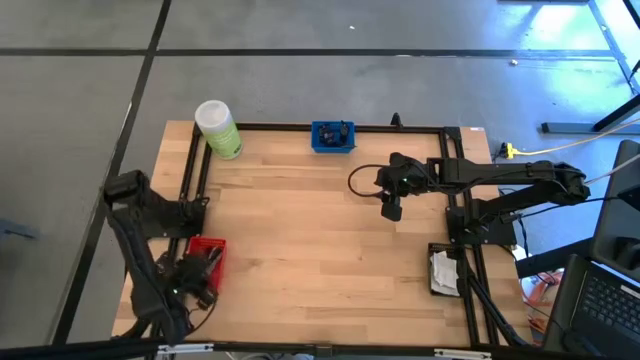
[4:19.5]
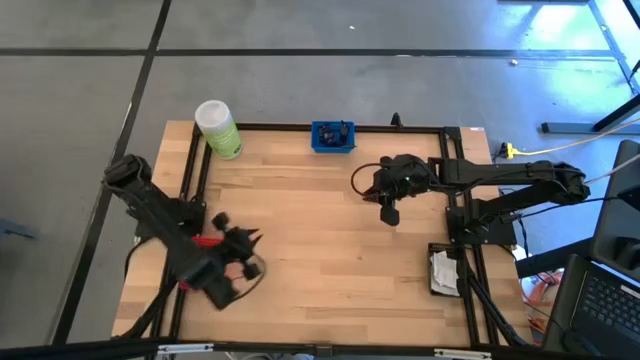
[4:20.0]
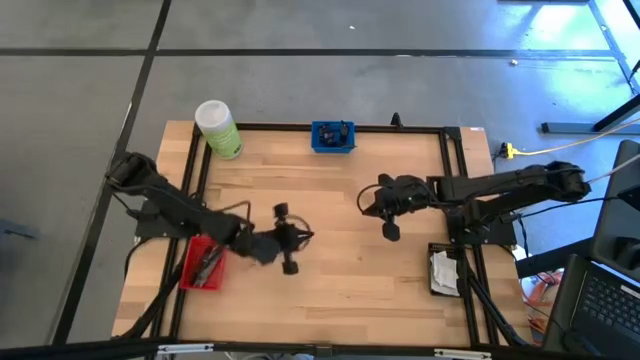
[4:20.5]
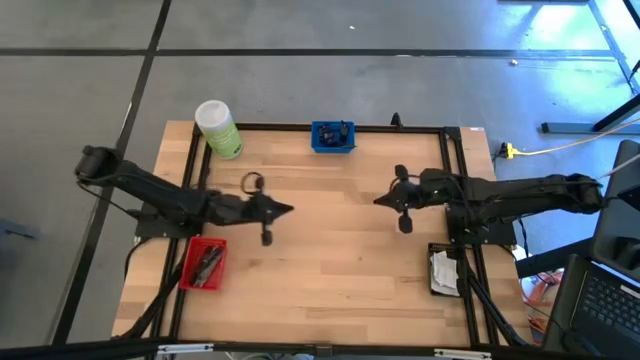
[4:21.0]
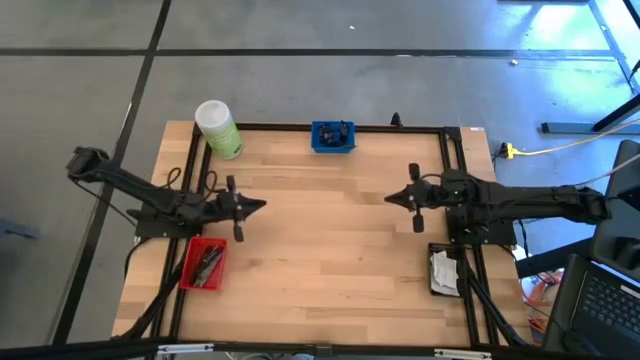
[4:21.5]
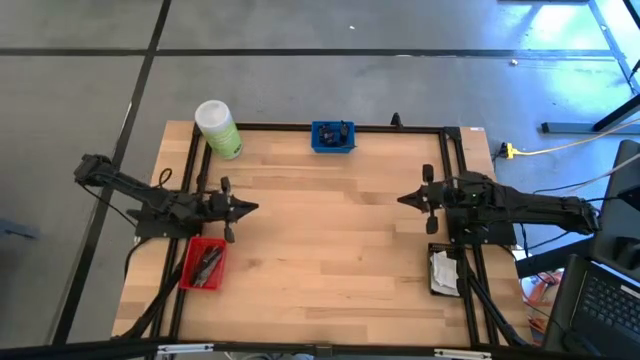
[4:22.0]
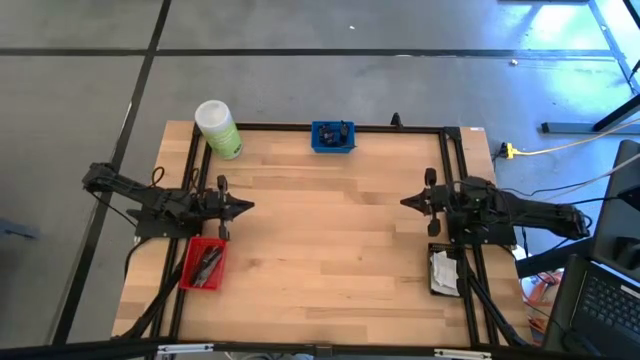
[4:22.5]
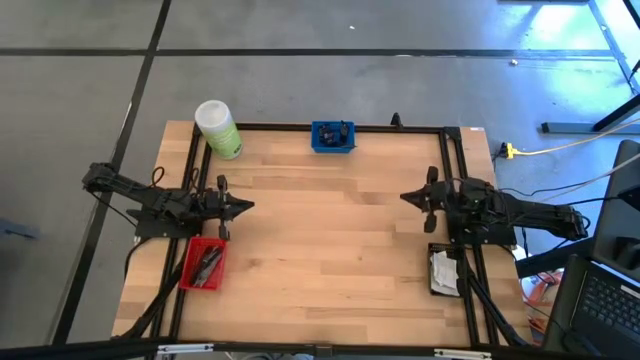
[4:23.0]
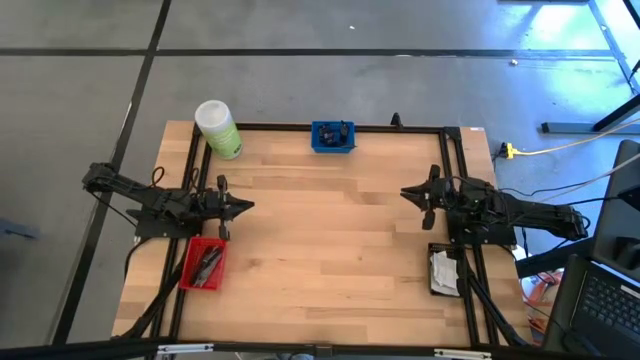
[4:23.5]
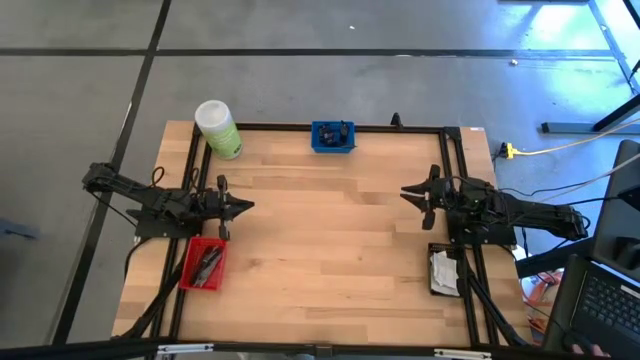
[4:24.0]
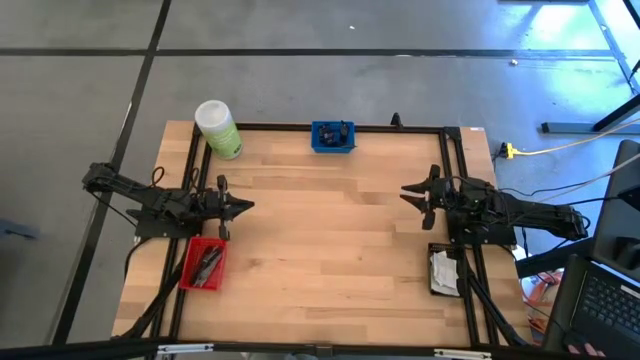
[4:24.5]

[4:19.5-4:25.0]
Task: Pick & Place Travel size toiletries
Return to Home Position

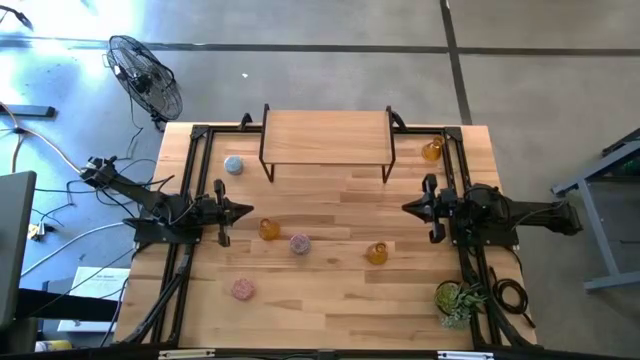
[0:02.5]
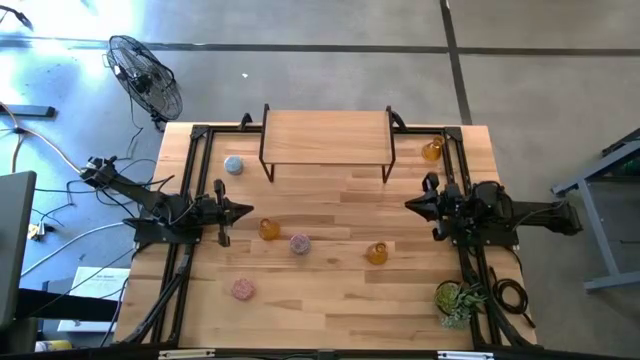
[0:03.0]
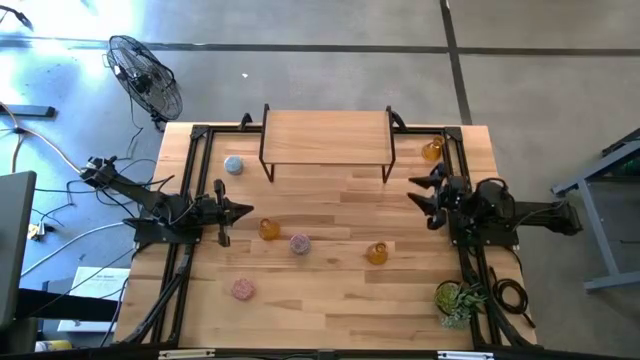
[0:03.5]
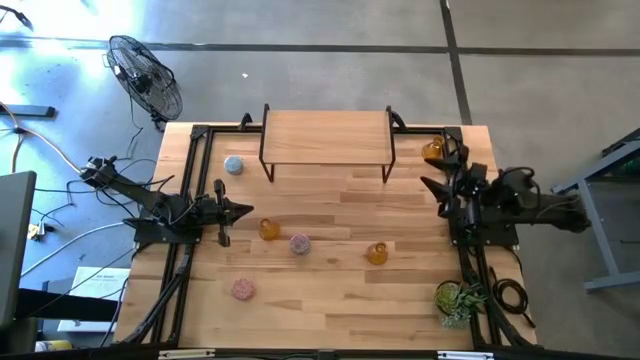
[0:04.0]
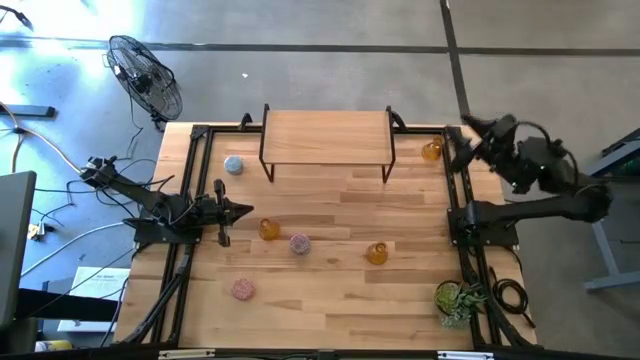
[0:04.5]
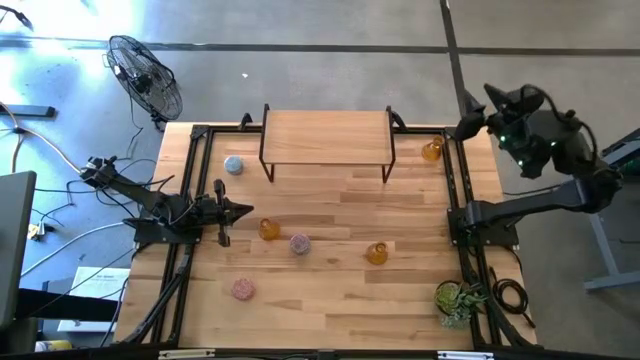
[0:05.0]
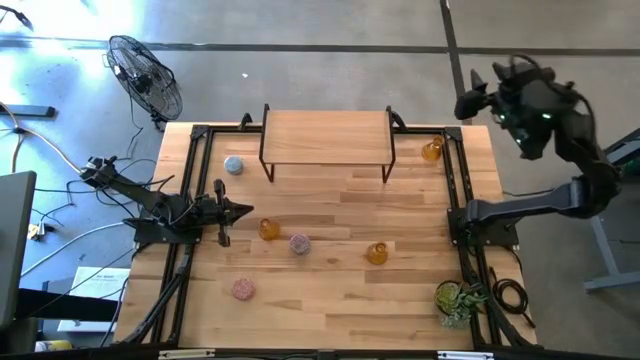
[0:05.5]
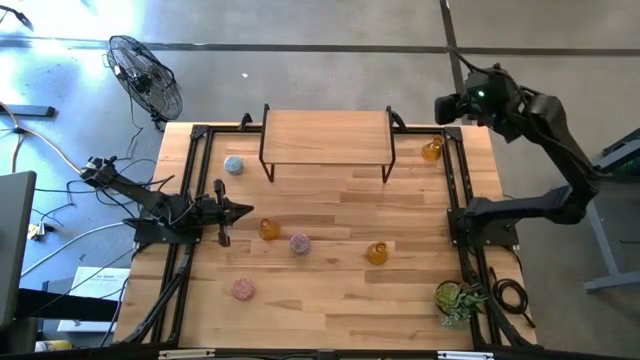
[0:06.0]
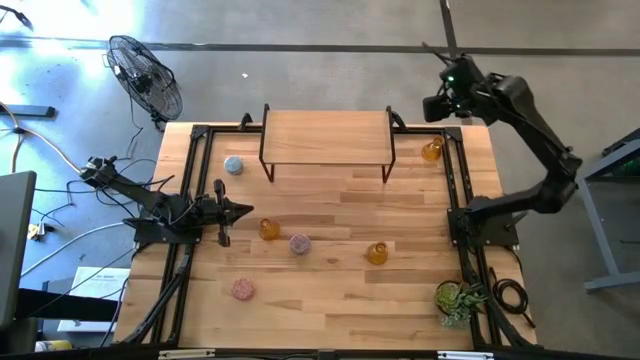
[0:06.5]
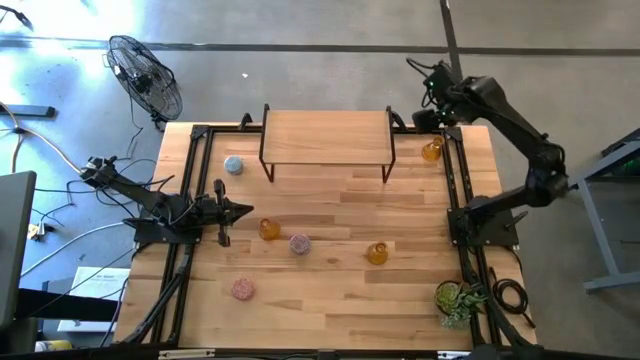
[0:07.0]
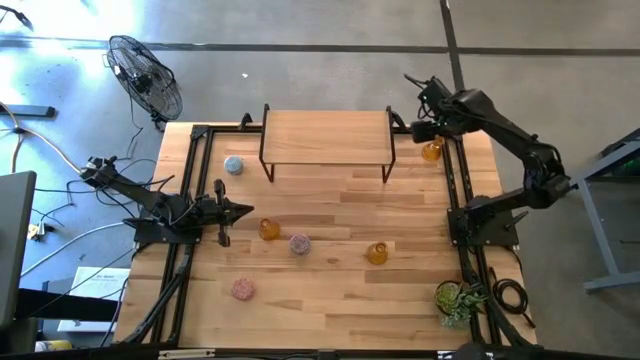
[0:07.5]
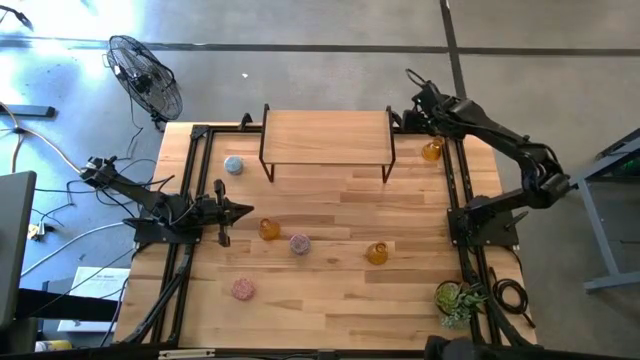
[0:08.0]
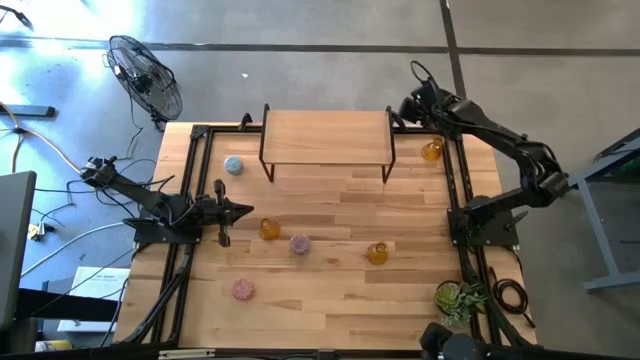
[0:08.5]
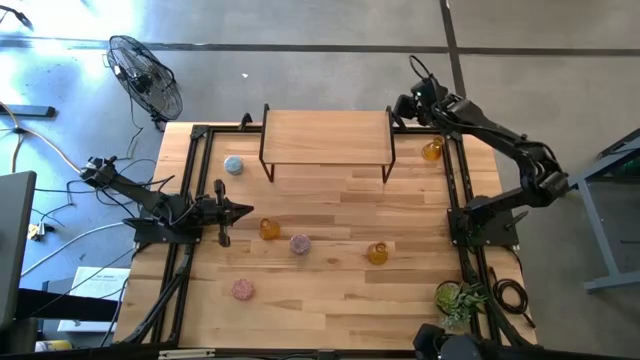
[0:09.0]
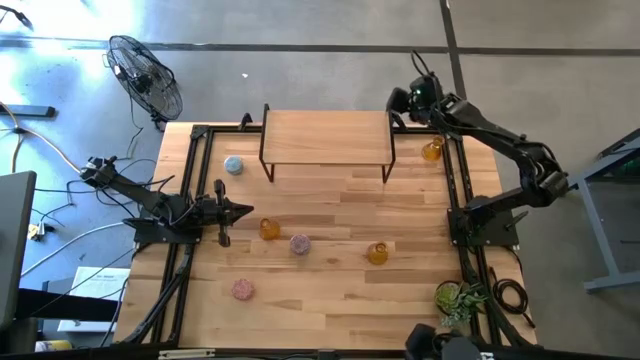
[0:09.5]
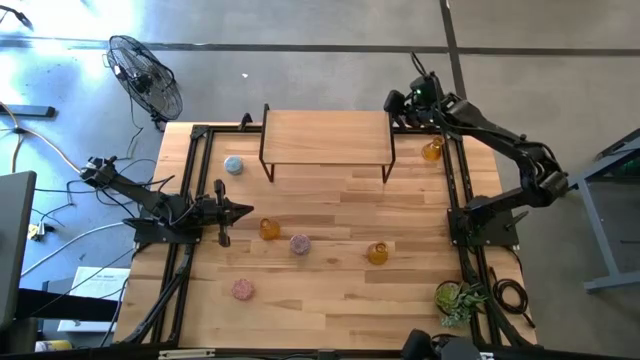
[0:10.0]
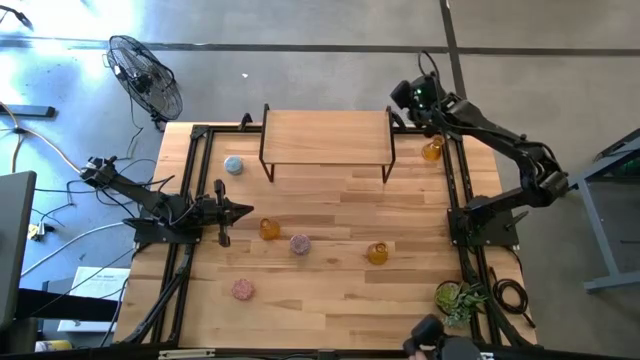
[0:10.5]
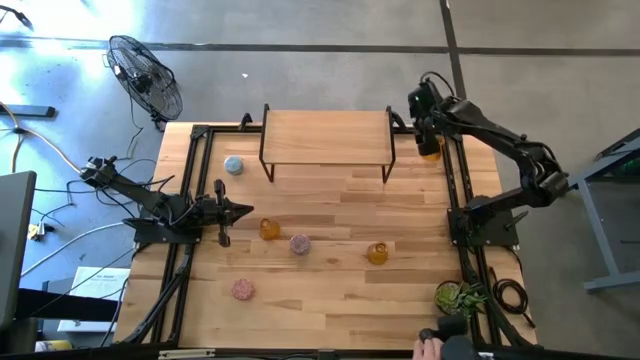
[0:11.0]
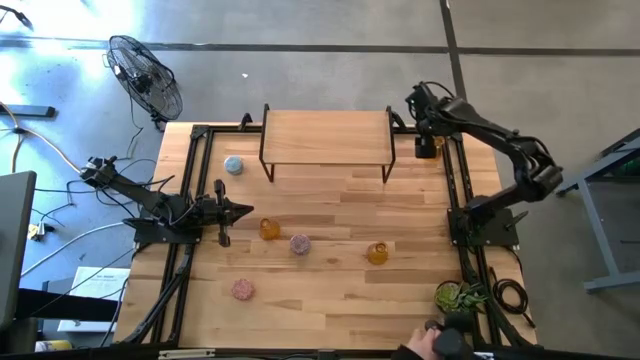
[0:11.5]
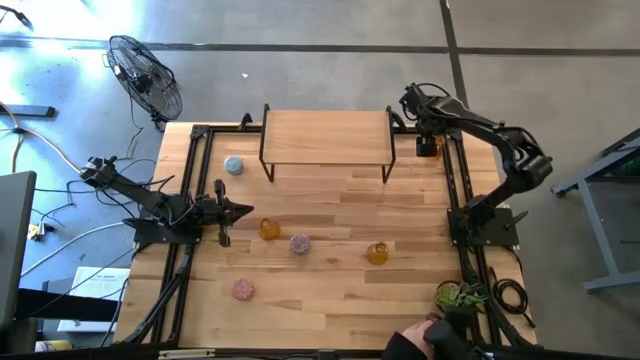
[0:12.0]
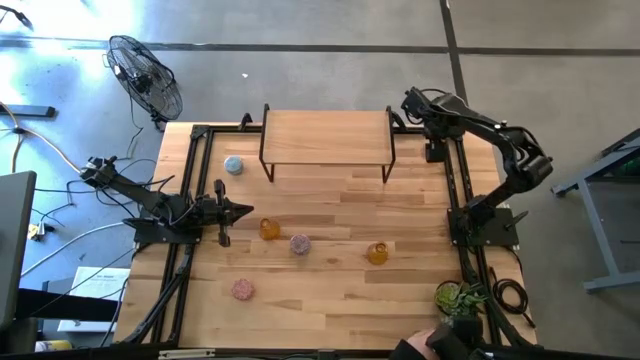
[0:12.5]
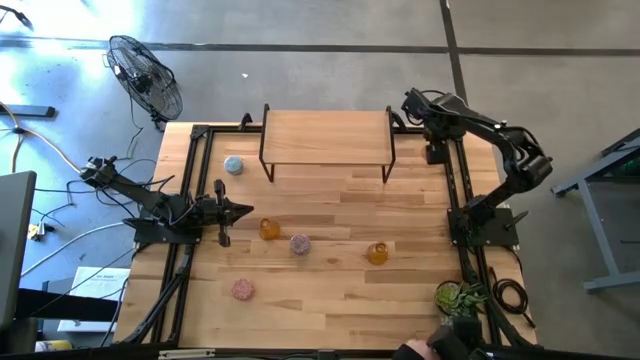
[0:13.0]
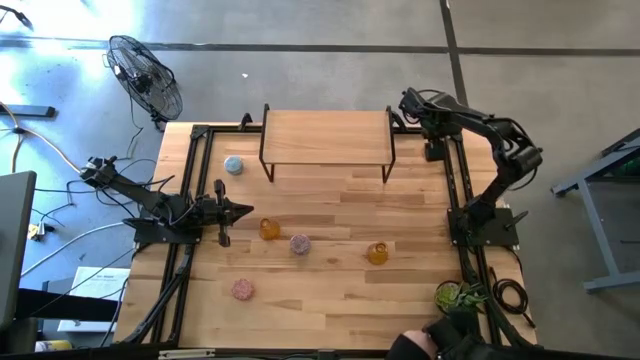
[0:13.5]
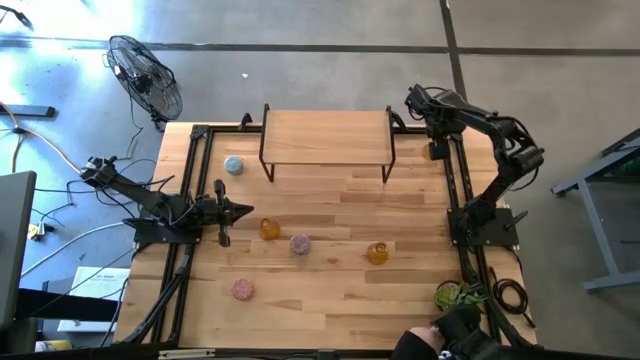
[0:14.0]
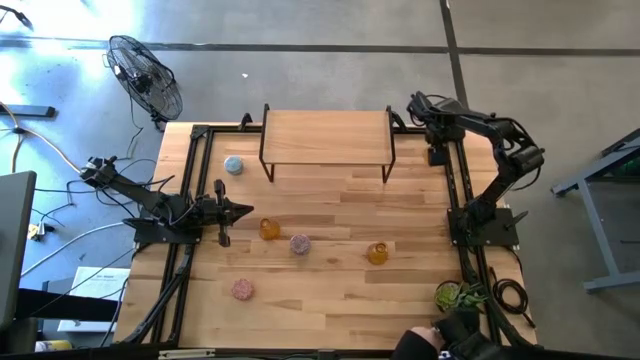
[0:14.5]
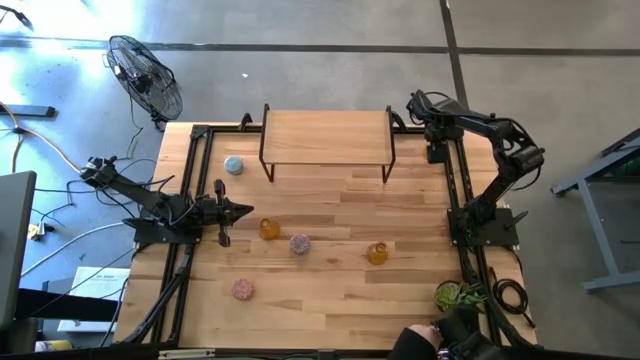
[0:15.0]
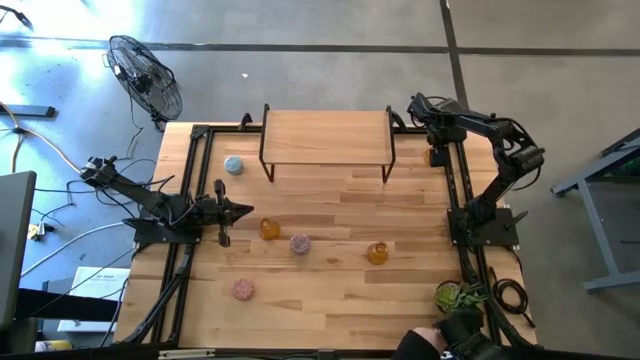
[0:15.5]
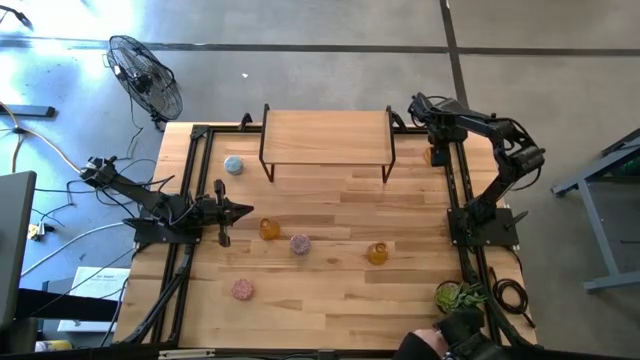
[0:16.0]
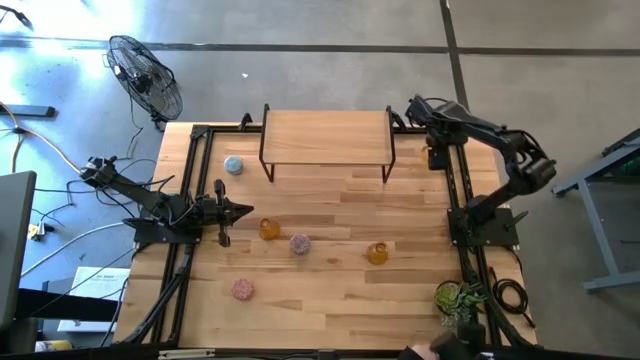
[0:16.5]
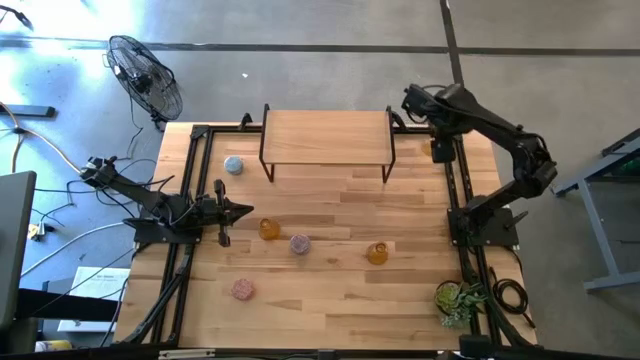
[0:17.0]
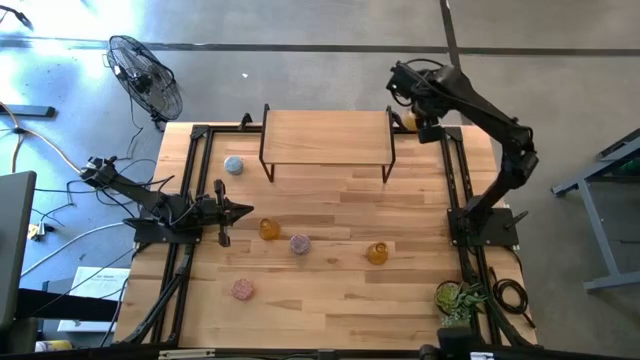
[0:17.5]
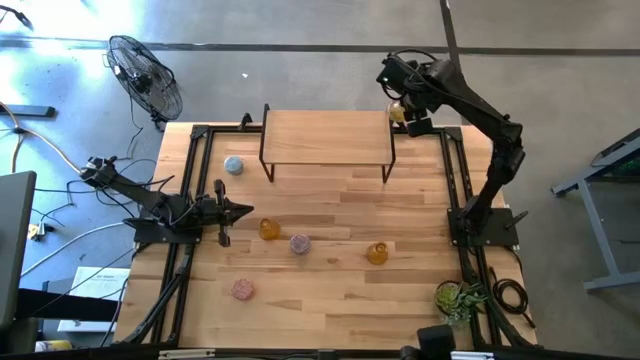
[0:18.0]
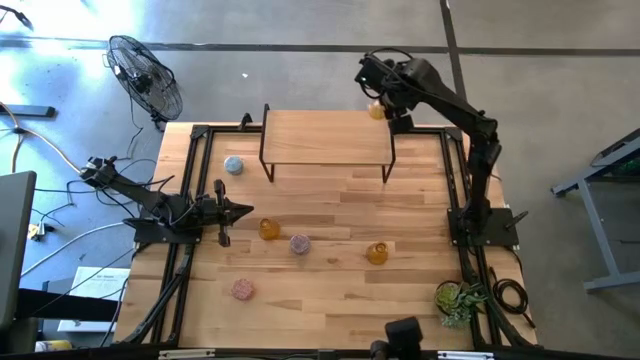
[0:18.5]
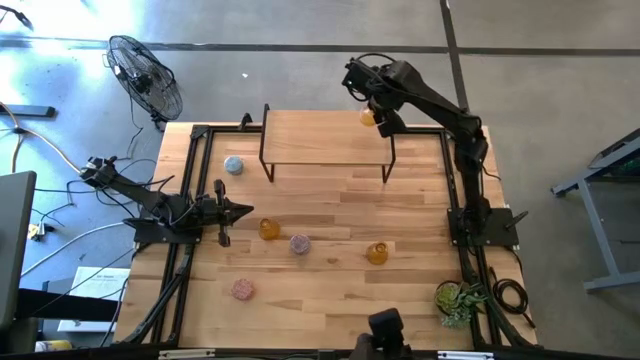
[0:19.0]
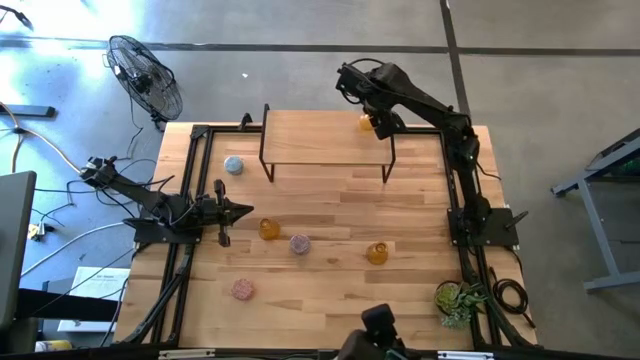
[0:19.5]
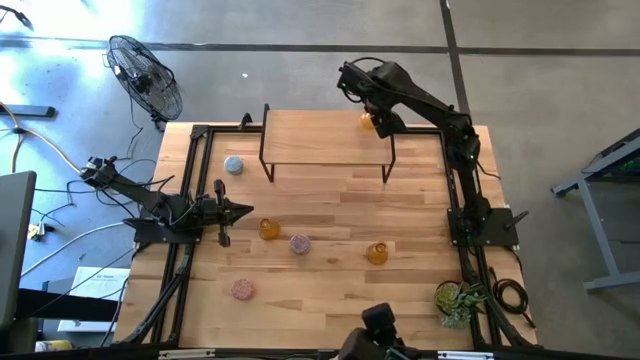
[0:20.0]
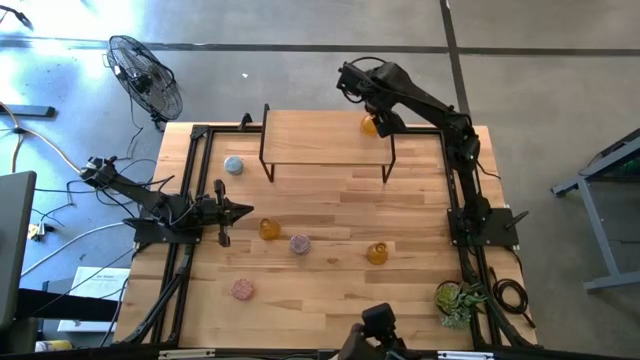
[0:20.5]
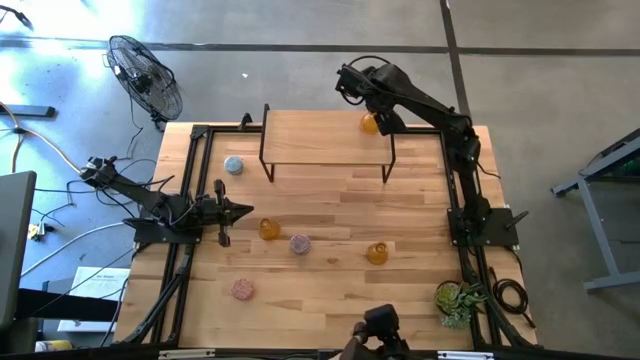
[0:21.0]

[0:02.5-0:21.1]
Task: Pick & Place candle stick holders
Put the top right orange candle holder on the shelf
